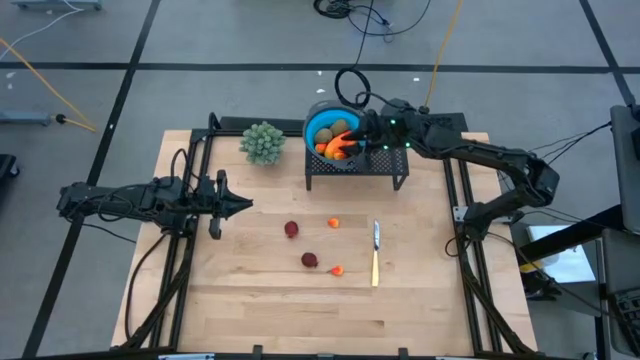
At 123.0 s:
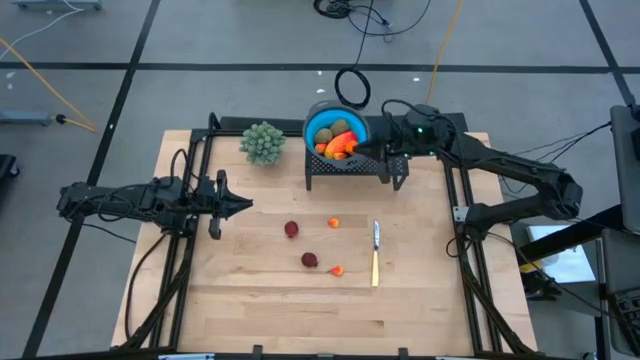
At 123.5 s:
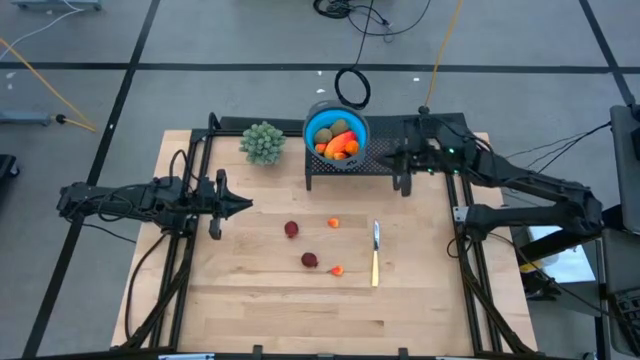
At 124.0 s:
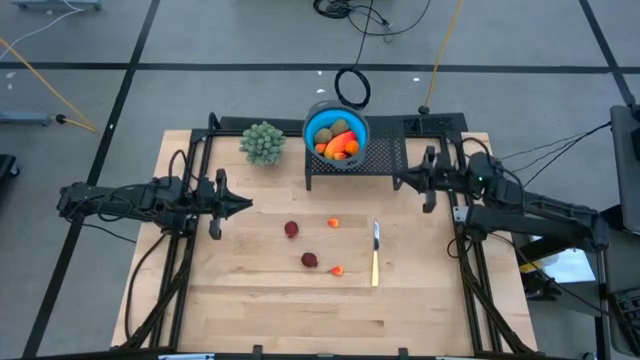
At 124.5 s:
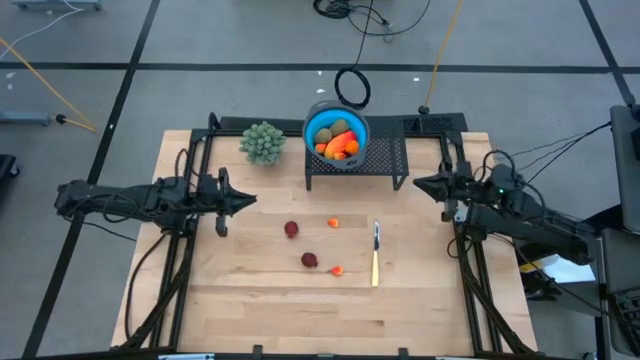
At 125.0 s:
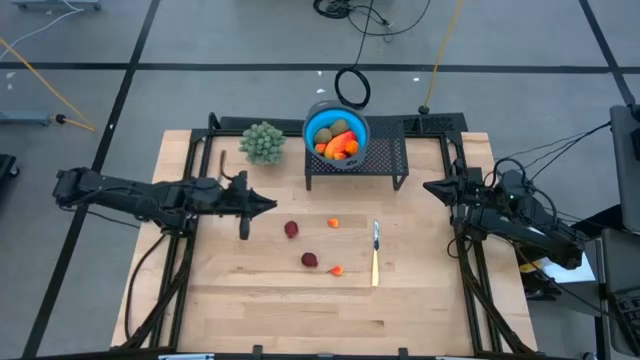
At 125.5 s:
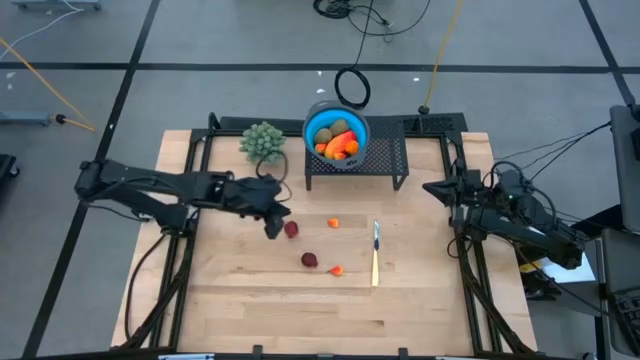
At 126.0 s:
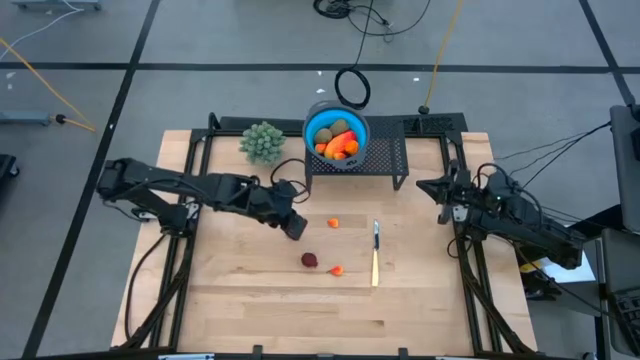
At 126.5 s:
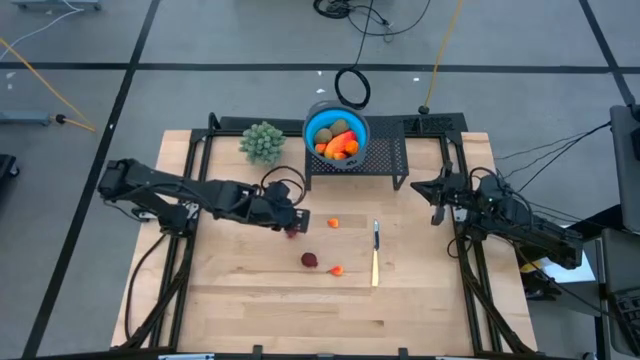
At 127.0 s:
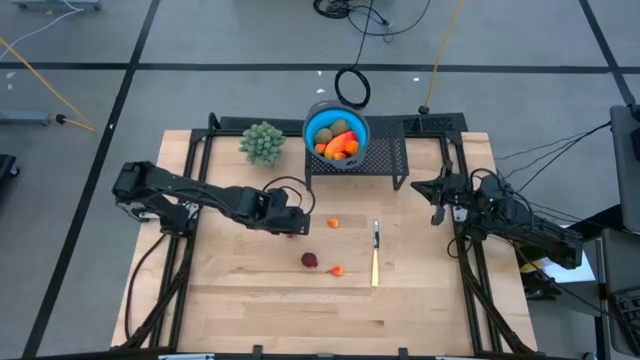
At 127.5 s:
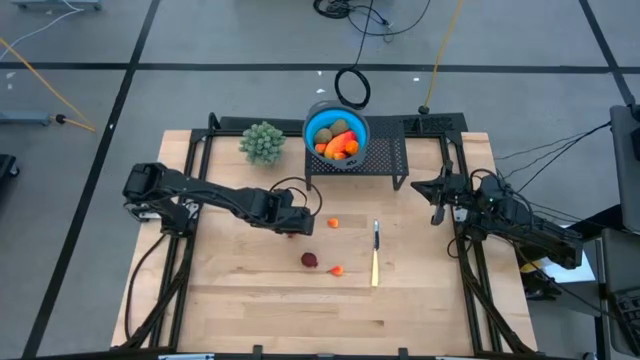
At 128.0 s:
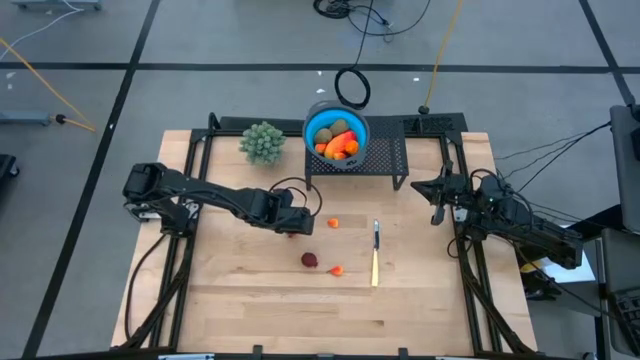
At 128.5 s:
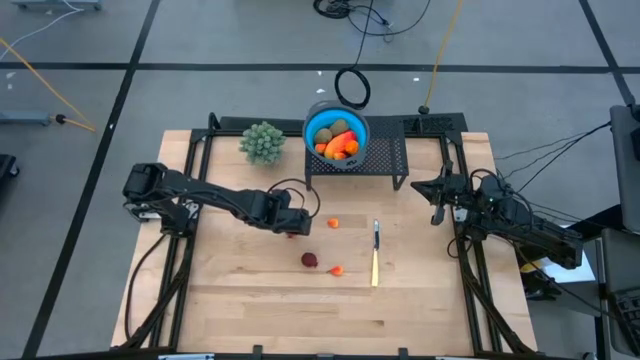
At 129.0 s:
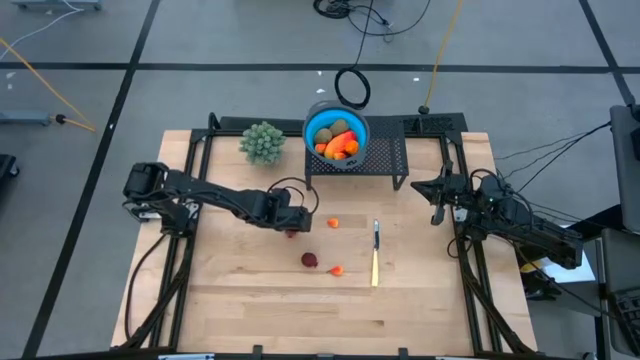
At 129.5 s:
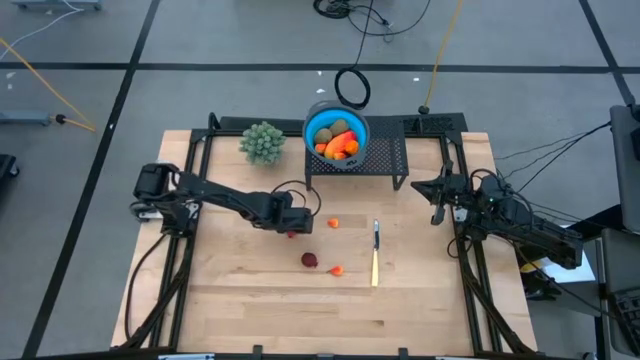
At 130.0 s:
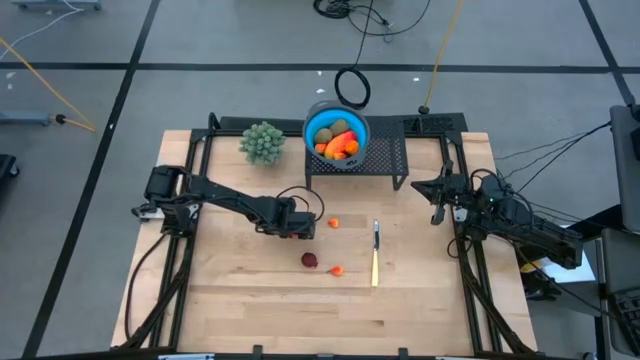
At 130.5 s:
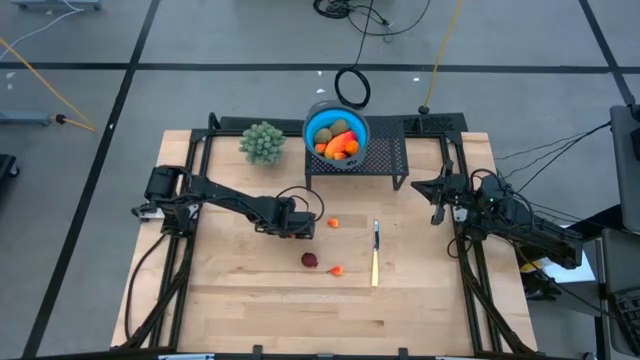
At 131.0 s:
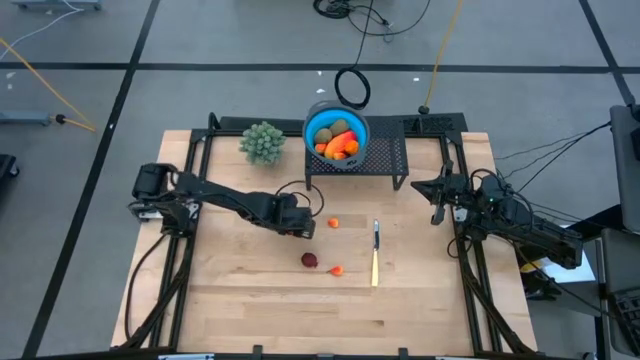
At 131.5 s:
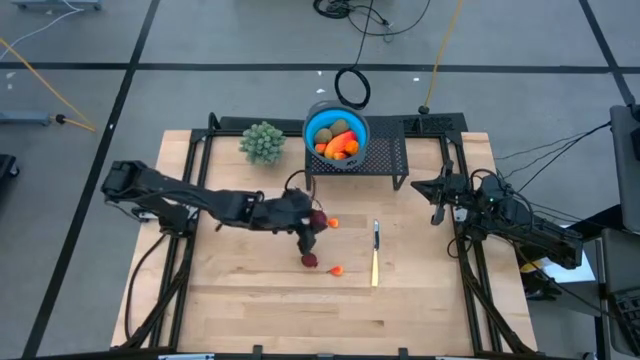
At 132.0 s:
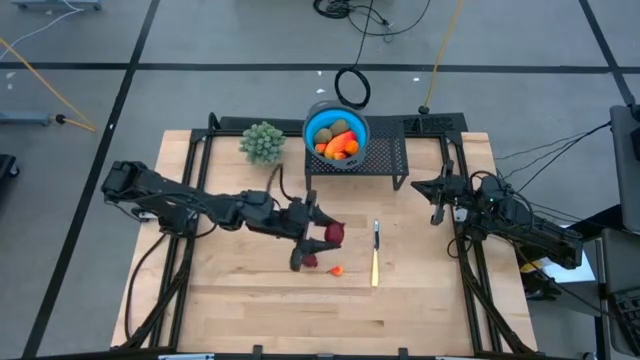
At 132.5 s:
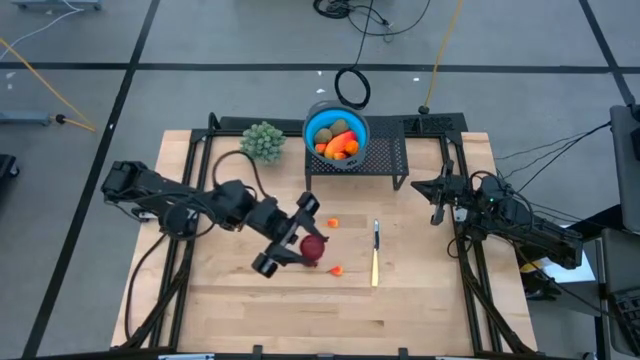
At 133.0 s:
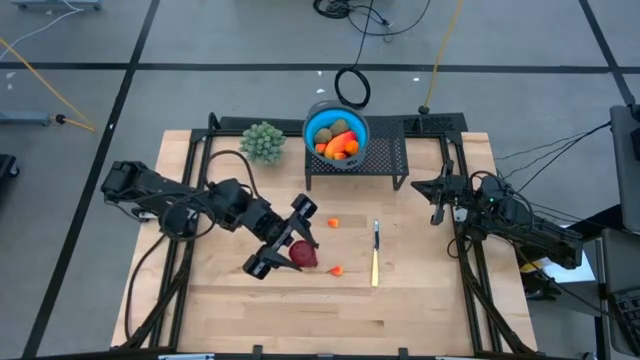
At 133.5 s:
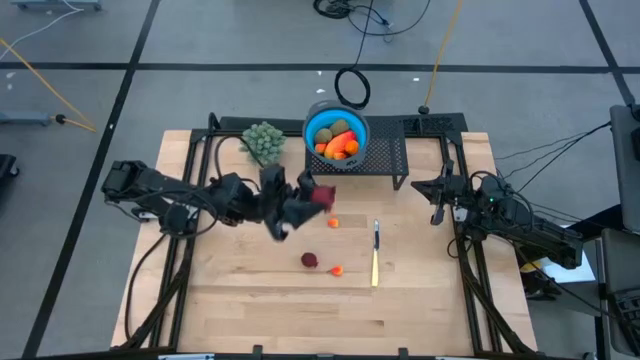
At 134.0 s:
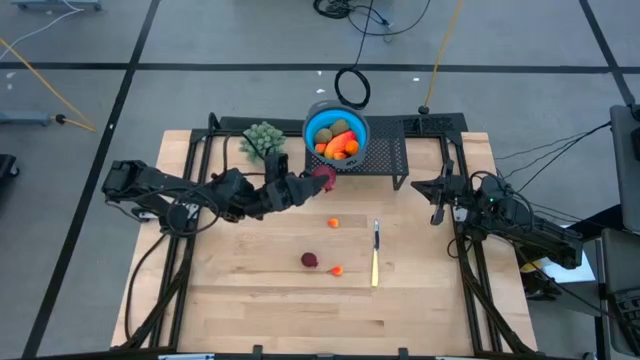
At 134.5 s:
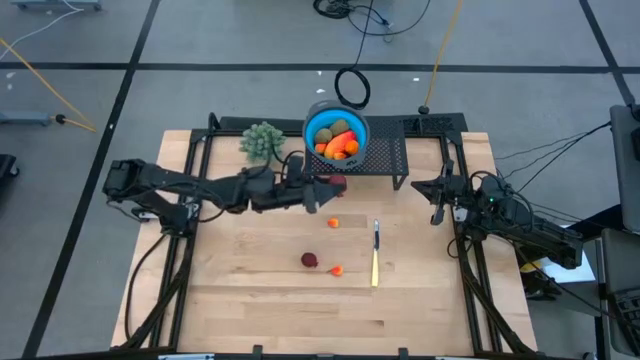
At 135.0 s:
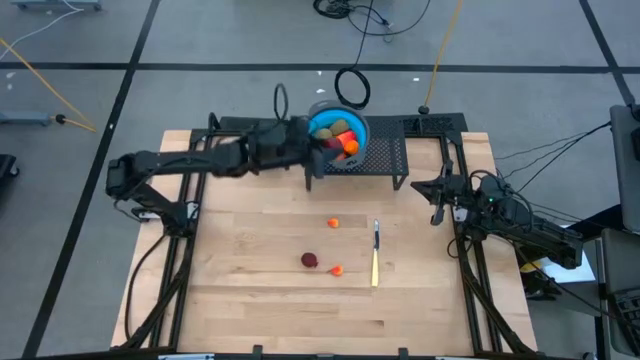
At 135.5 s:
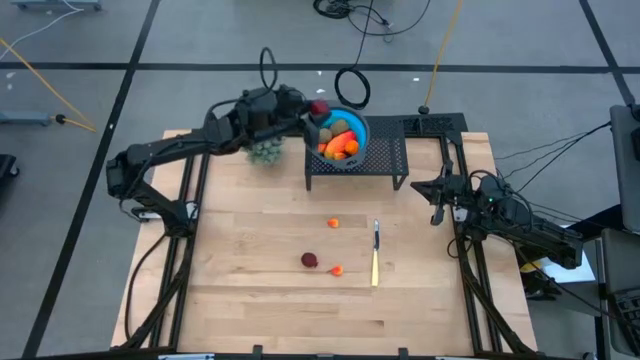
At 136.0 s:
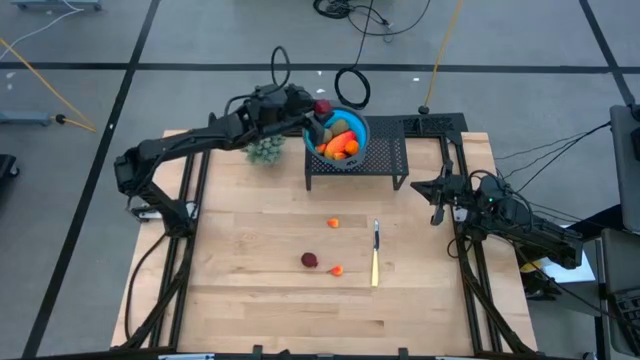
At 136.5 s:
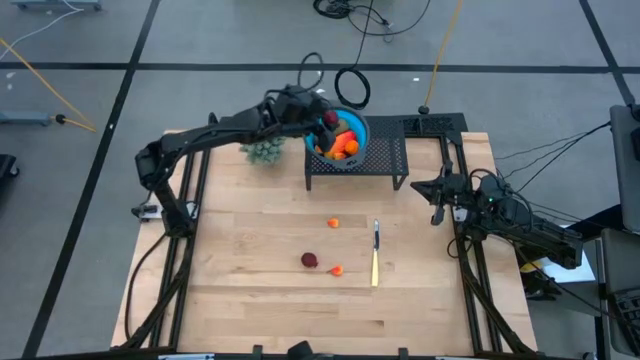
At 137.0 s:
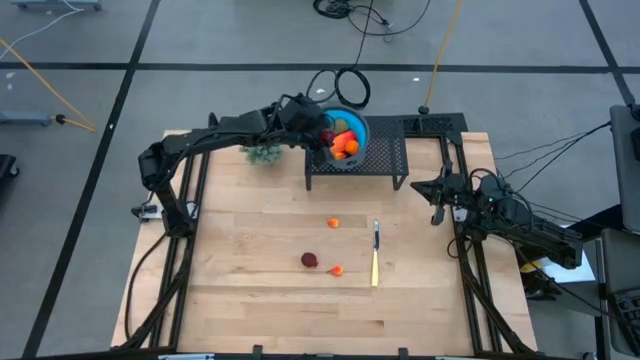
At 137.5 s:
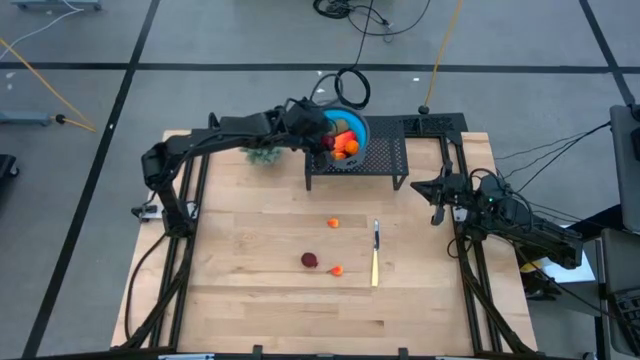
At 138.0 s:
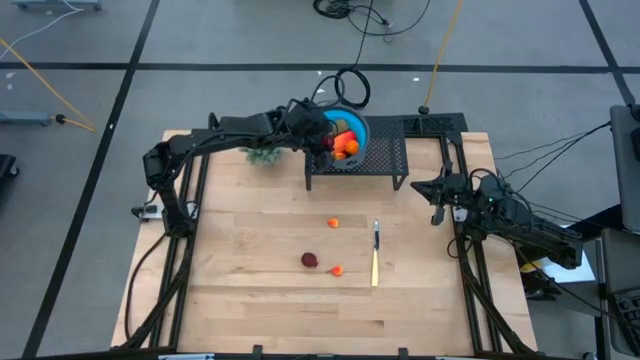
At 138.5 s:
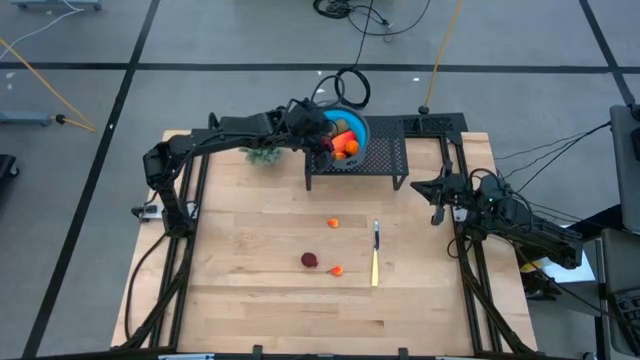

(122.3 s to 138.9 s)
Task: Pick & Place Fruit
Put the red pomegranate into the blue strainer bowl on the shelf

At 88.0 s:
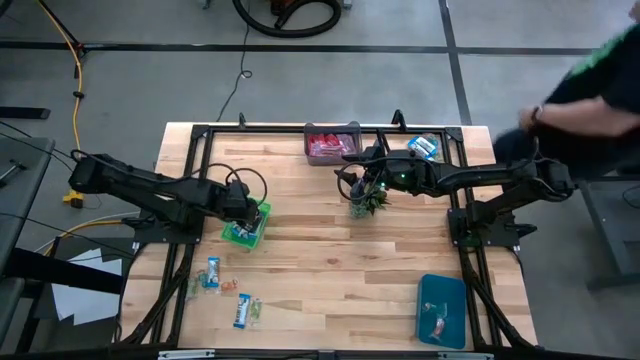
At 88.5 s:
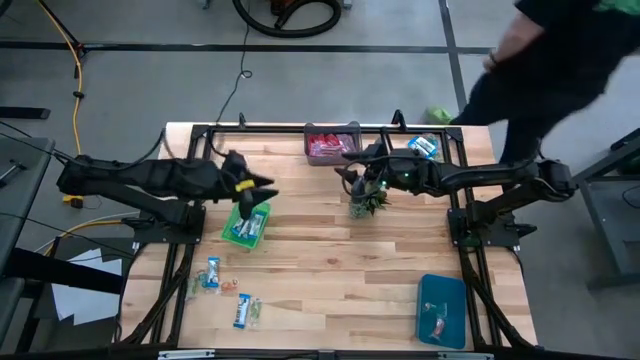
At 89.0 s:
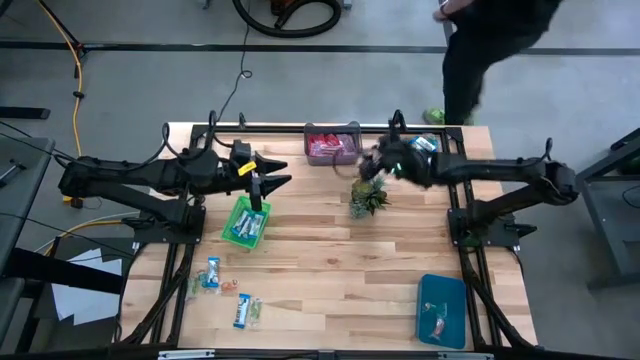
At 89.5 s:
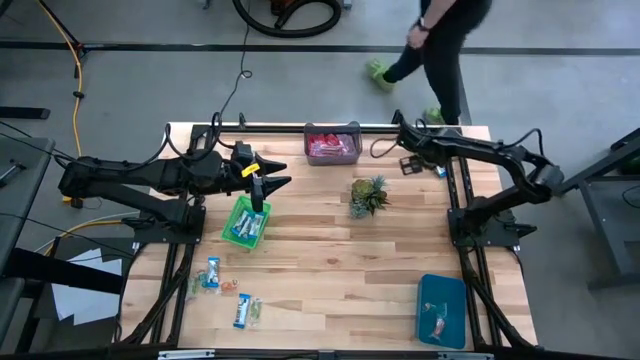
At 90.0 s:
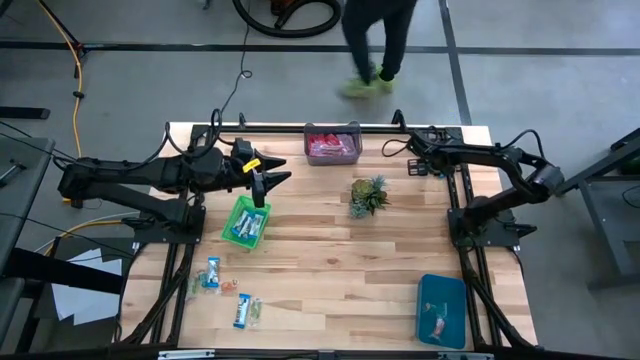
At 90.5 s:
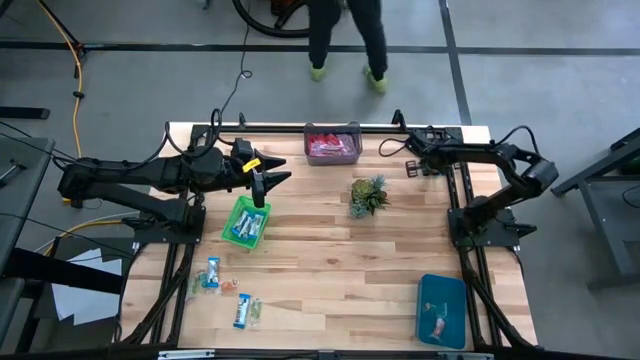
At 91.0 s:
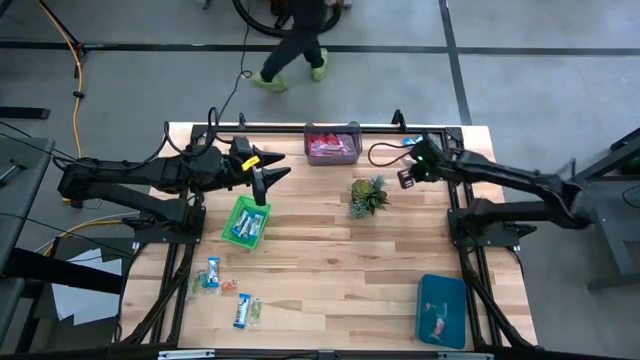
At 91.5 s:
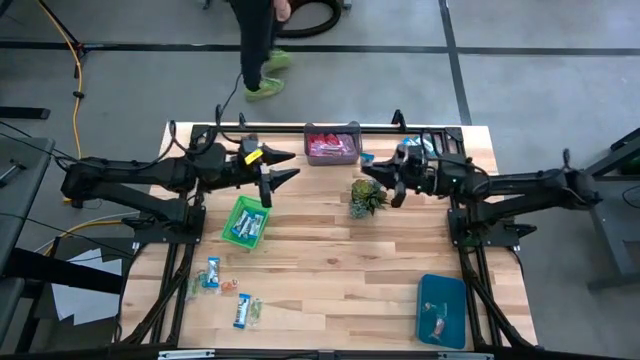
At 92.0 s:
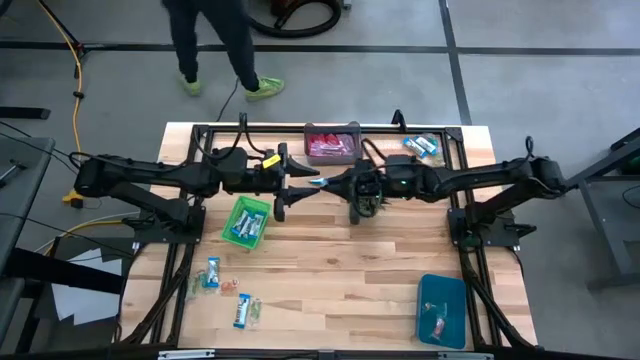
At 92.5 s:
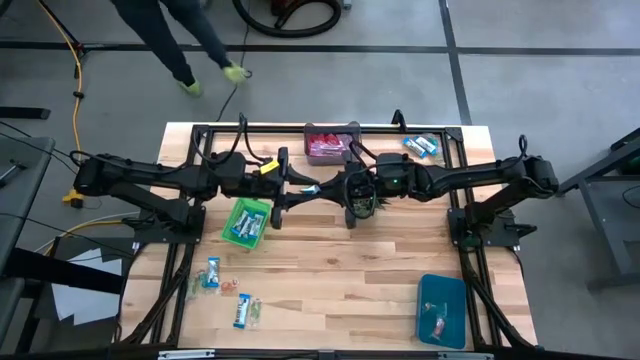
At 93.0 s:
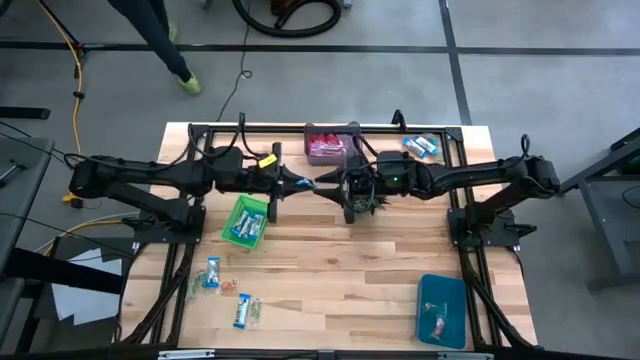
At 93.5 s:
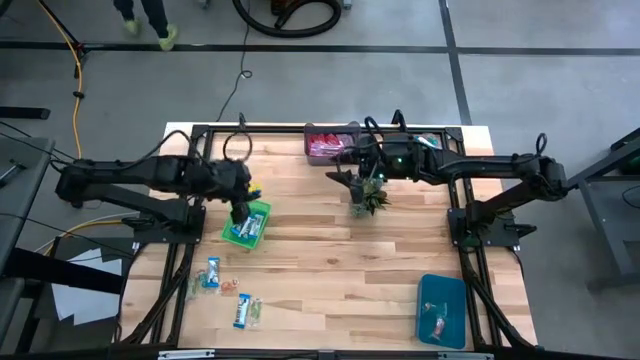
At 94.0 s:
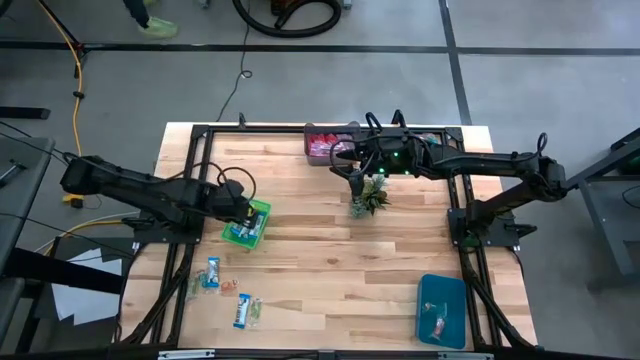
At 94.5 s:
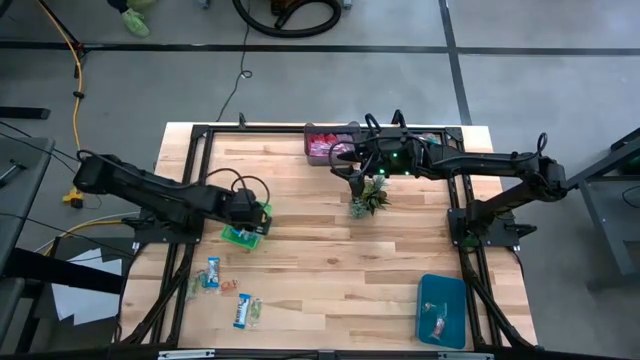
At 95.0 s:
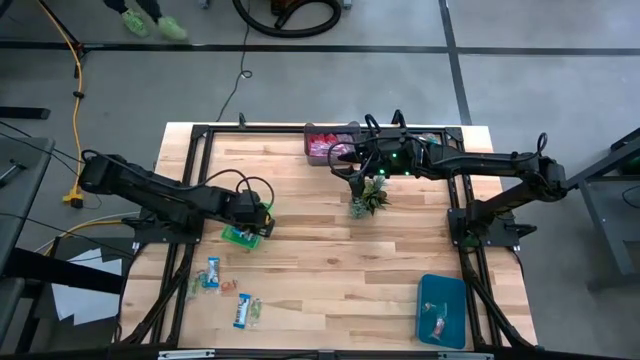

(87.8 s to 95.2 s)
Task: Sort candy
Put the white candy into the green bin
